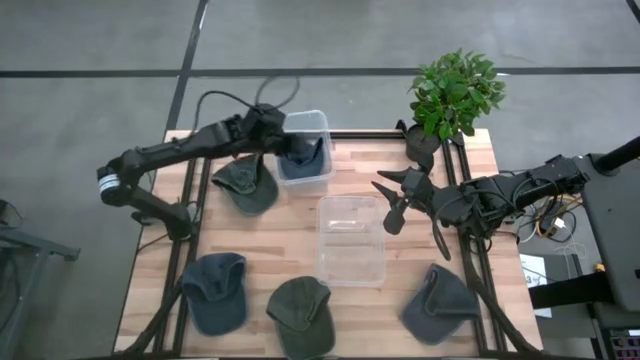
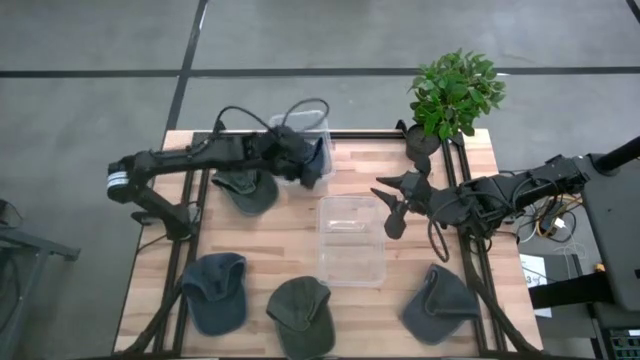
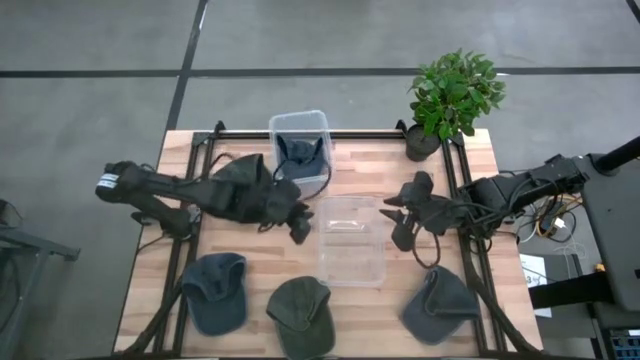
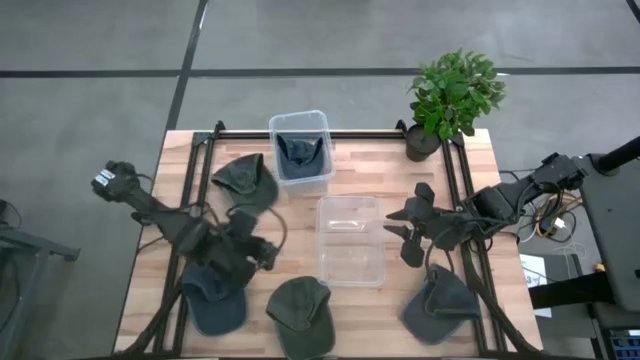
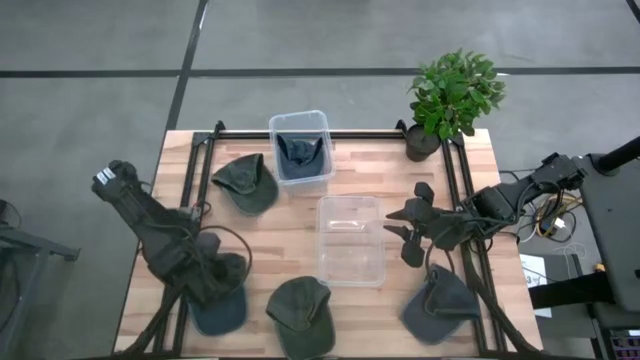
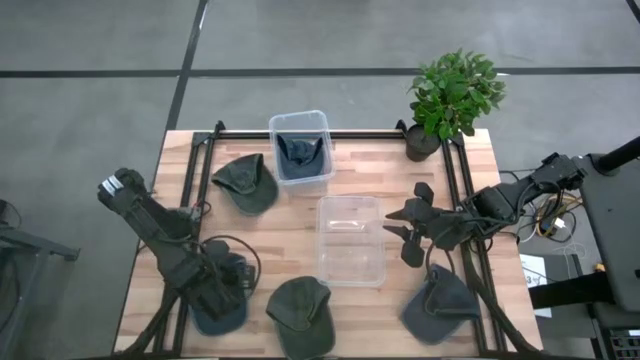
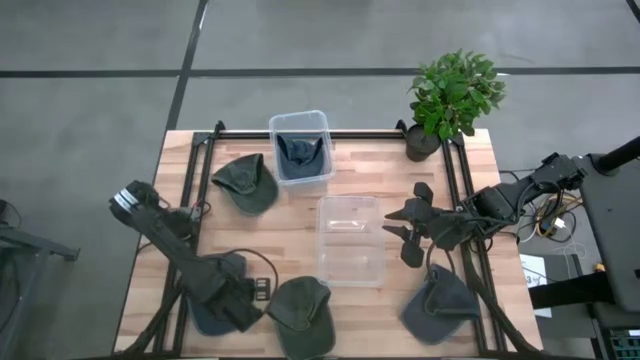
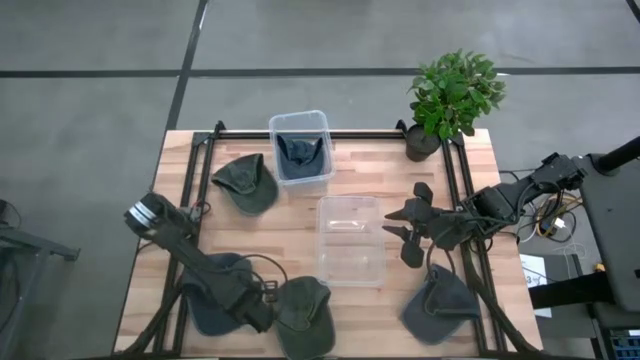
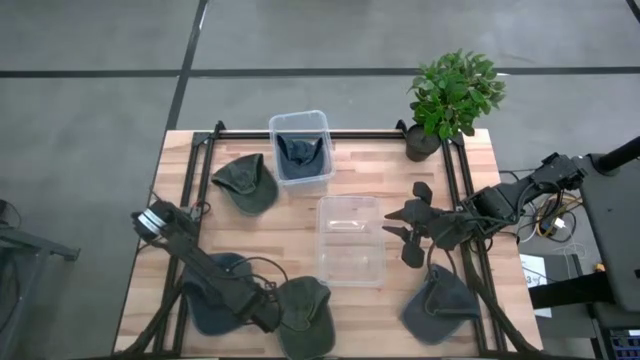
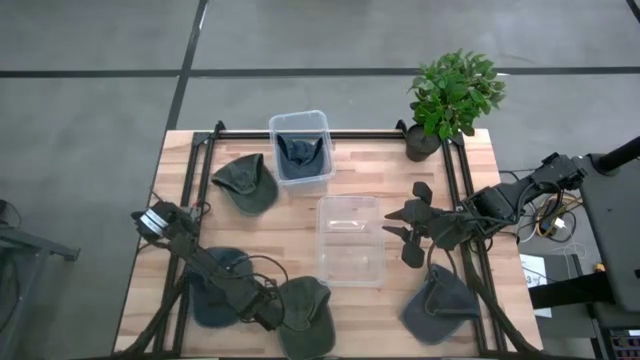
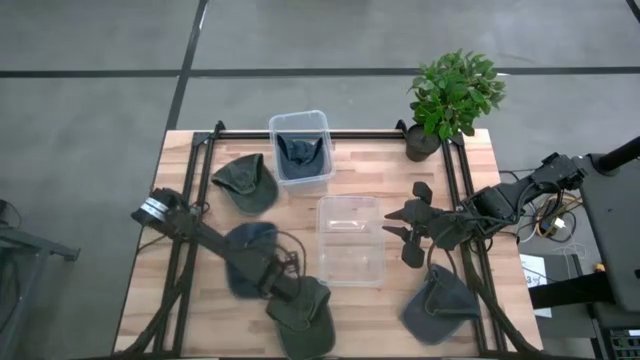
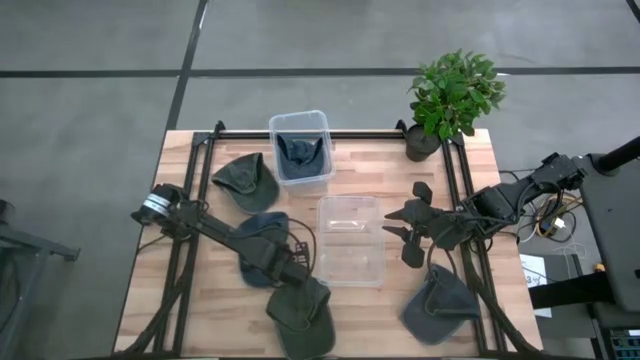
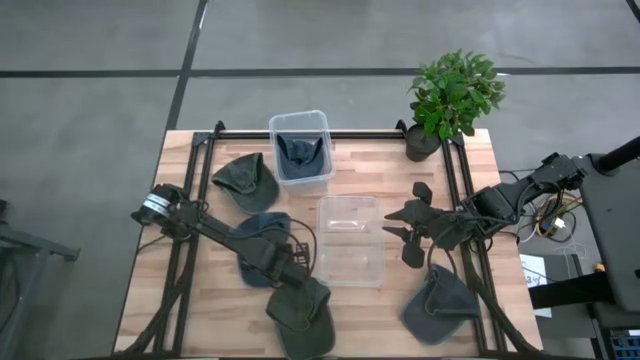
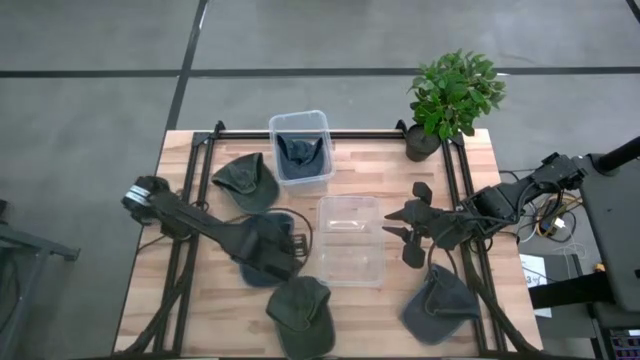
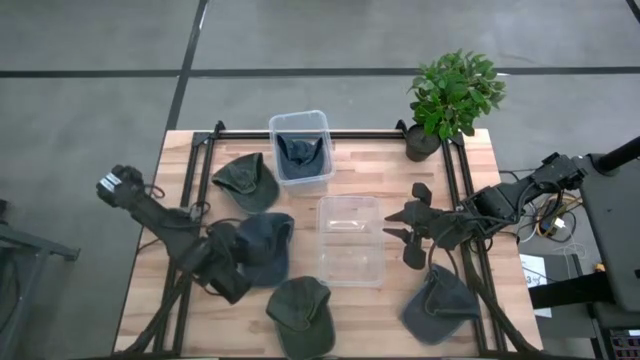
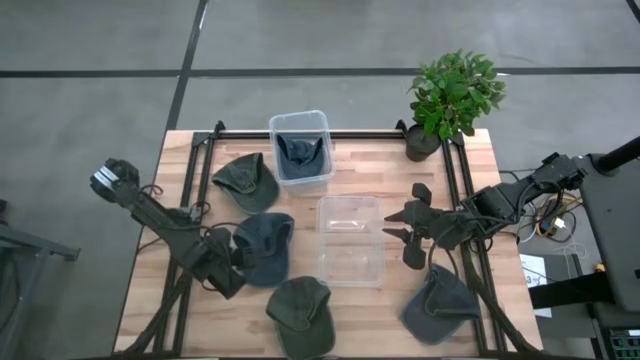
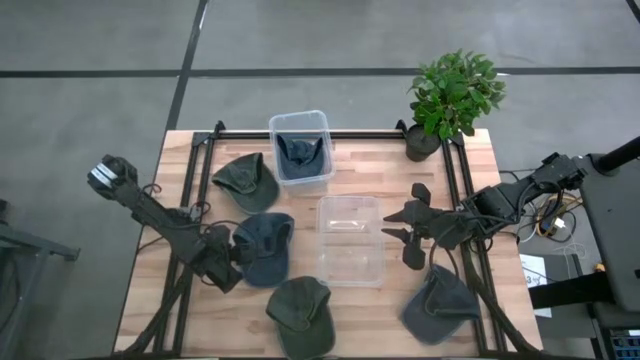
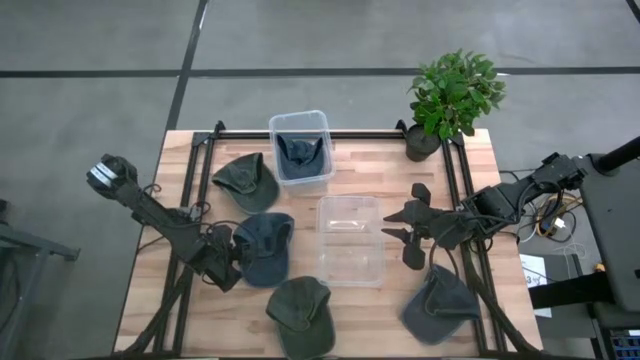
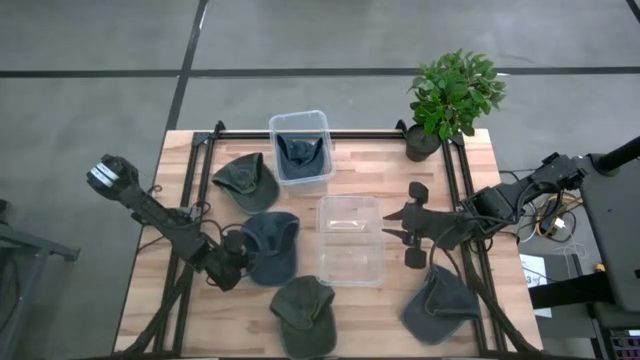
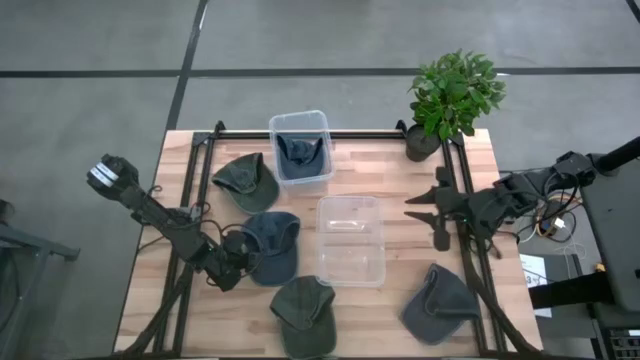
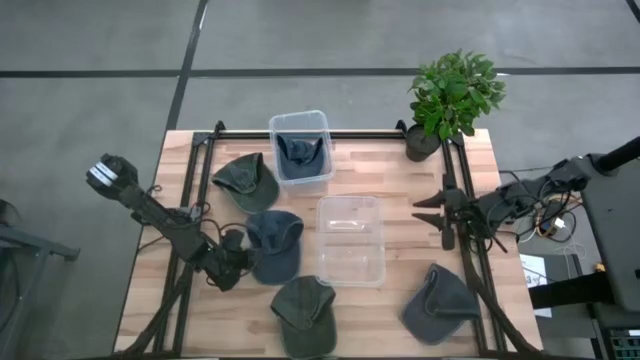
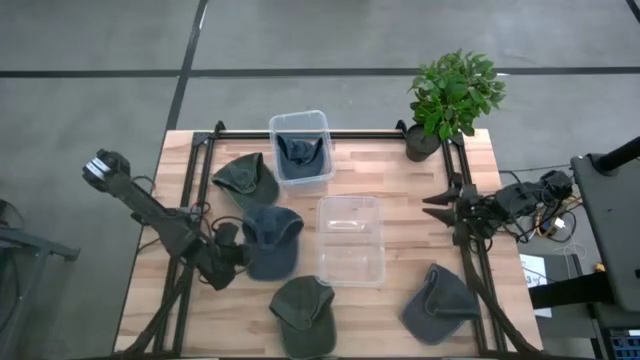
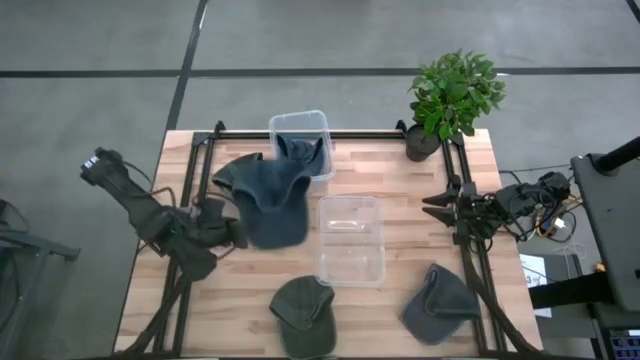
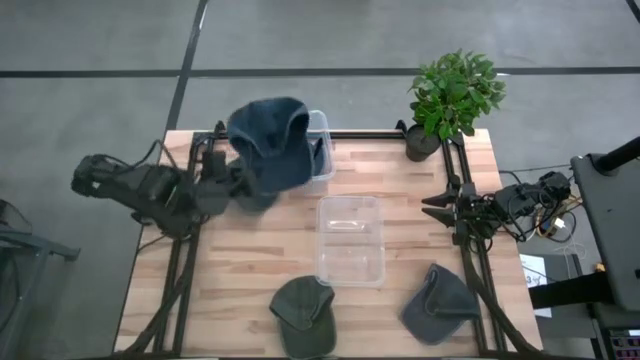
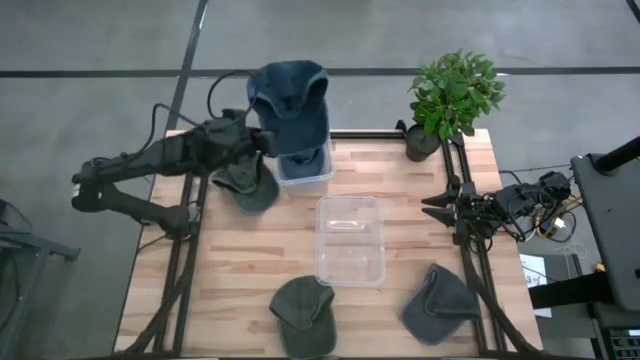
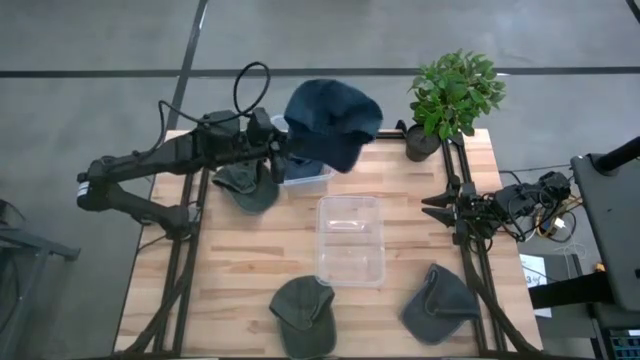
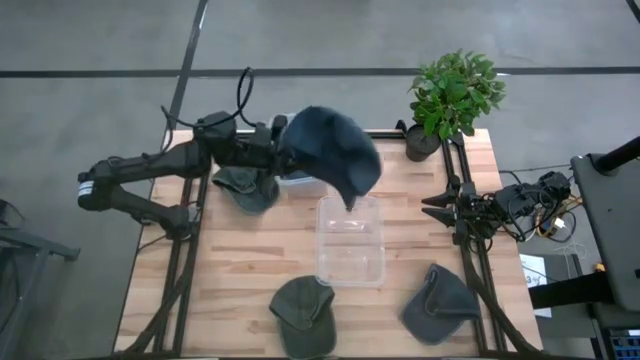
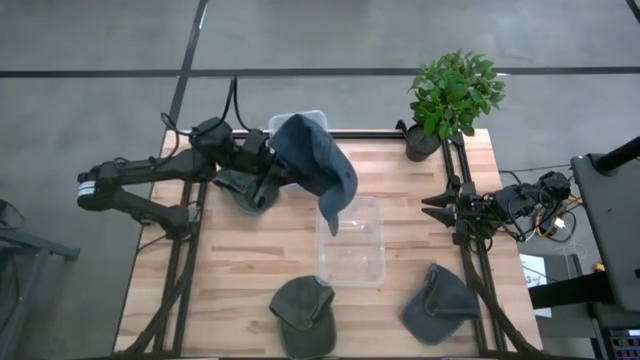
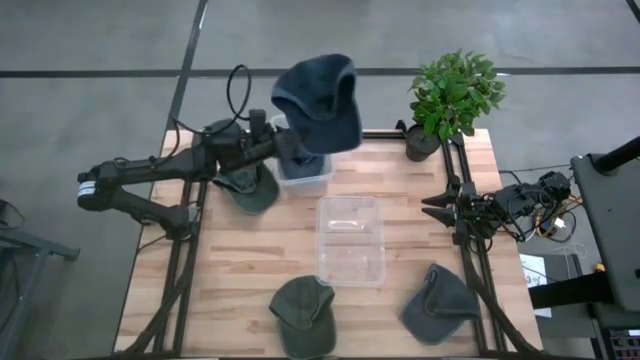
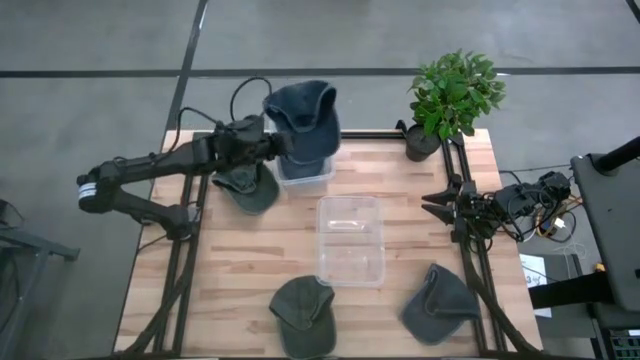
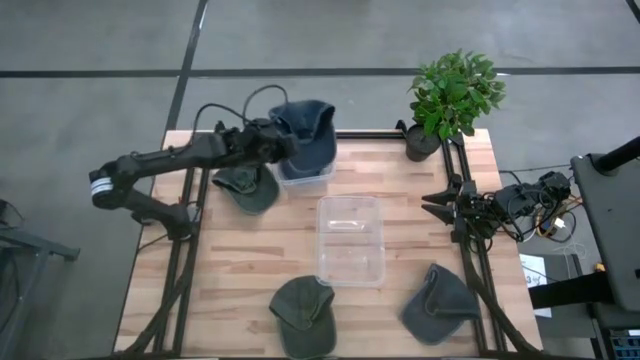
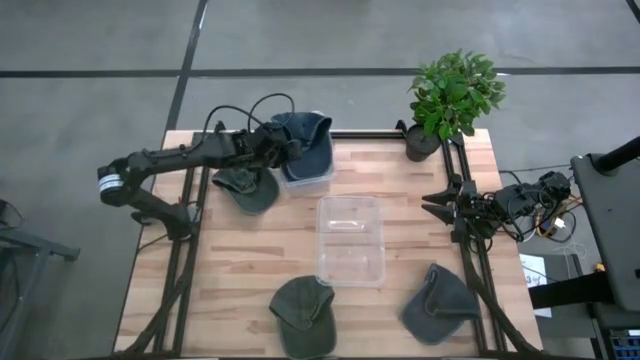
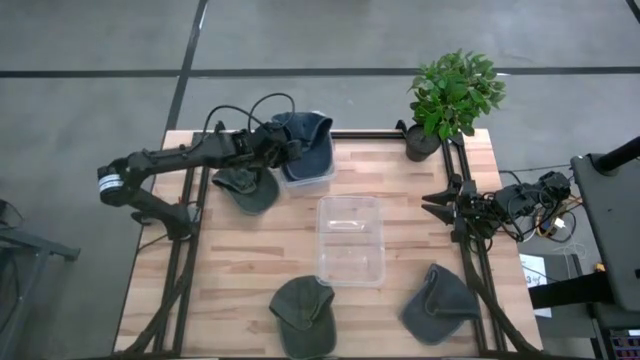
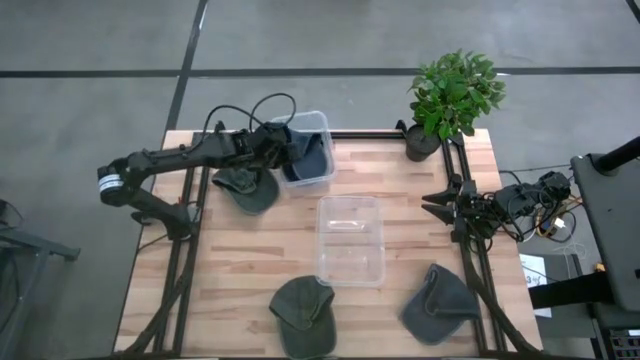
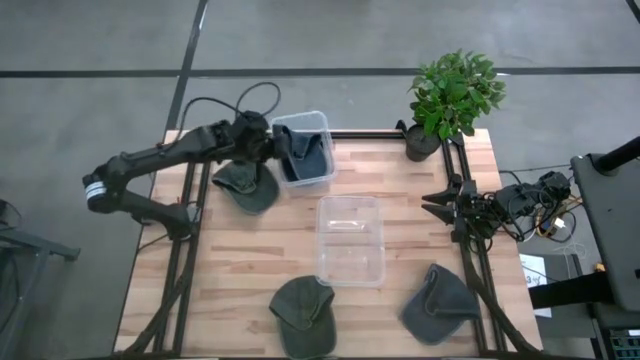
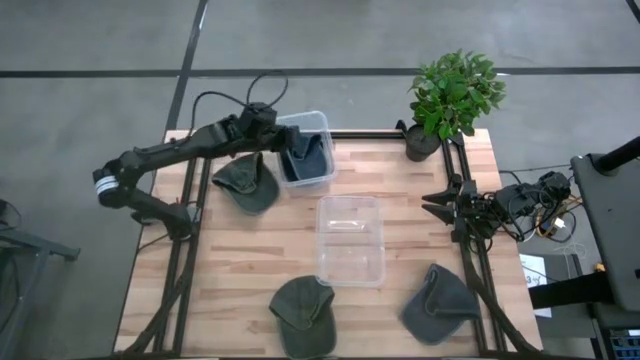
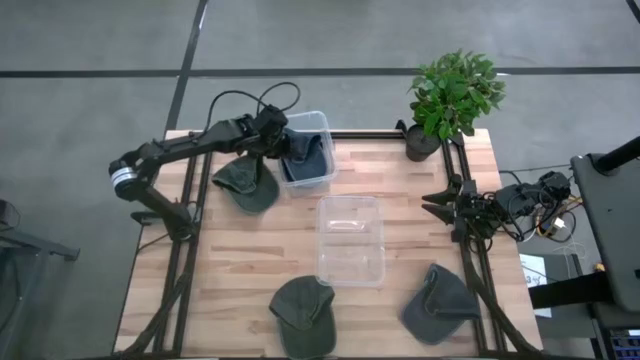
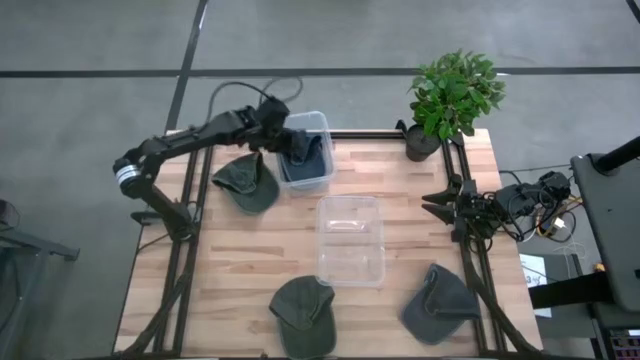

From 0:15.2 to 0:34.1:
Task: Pick & Place hat
Put the left blue cap into the top transparent bin
